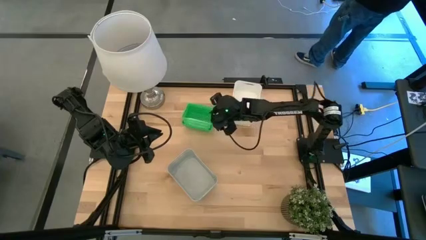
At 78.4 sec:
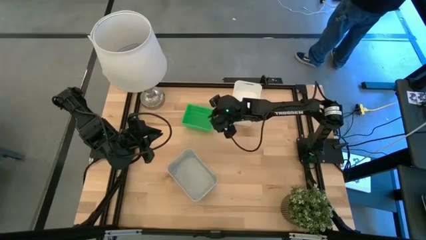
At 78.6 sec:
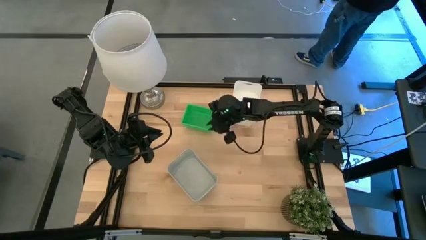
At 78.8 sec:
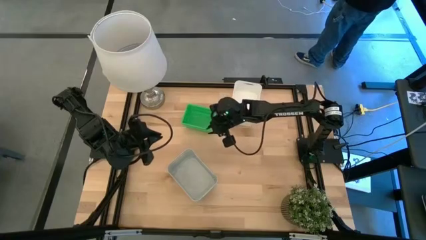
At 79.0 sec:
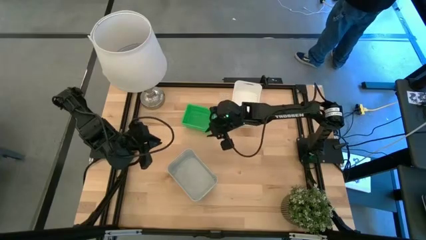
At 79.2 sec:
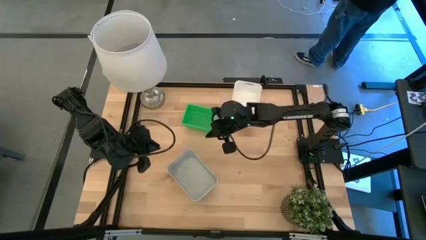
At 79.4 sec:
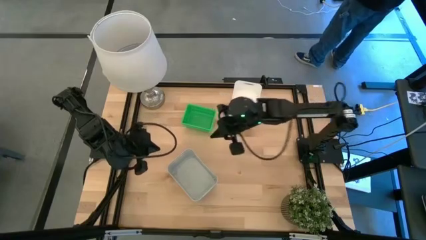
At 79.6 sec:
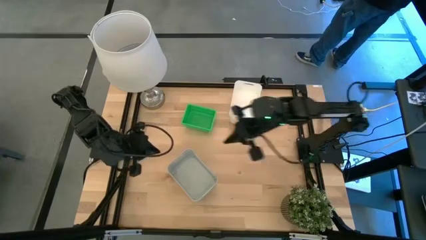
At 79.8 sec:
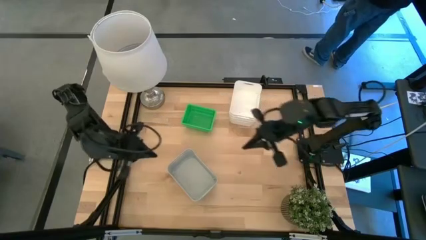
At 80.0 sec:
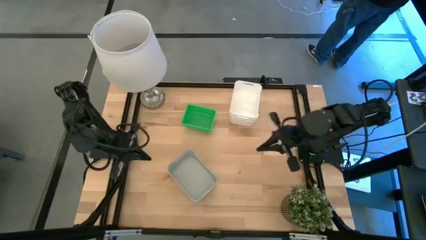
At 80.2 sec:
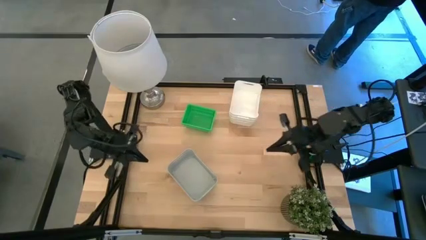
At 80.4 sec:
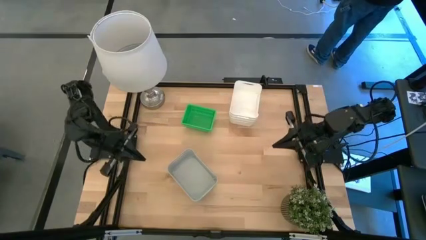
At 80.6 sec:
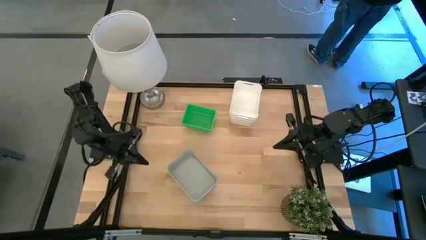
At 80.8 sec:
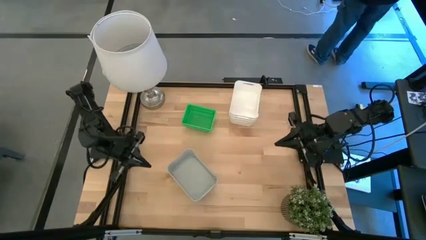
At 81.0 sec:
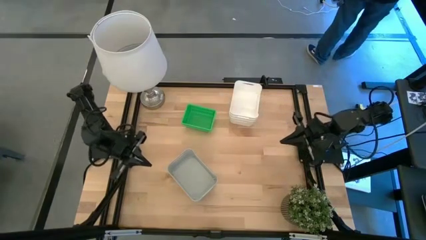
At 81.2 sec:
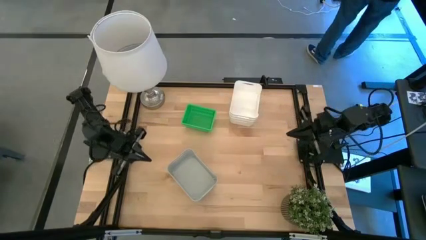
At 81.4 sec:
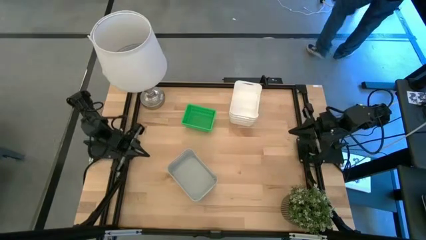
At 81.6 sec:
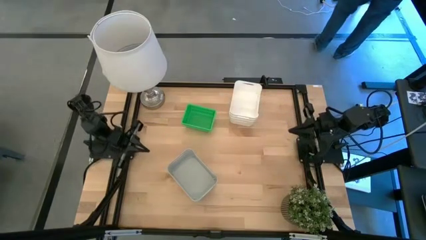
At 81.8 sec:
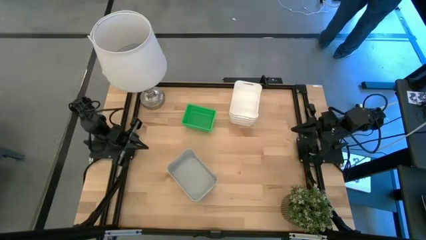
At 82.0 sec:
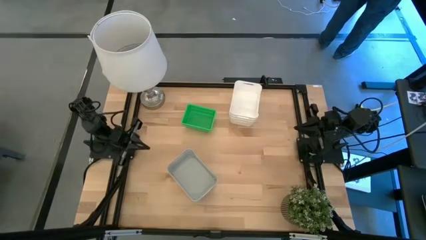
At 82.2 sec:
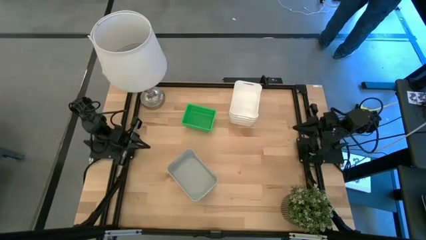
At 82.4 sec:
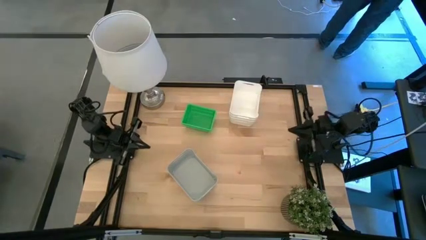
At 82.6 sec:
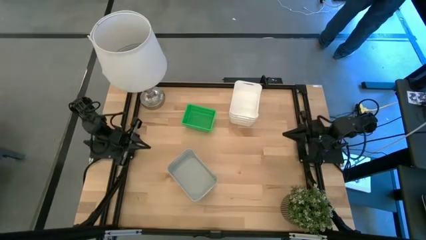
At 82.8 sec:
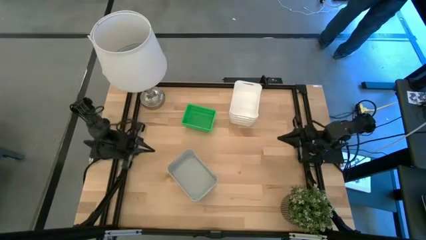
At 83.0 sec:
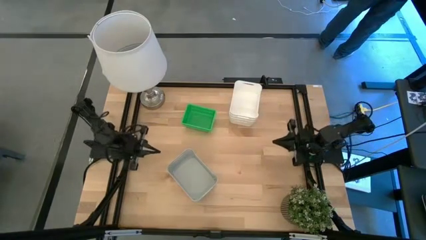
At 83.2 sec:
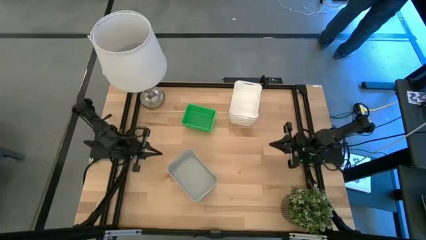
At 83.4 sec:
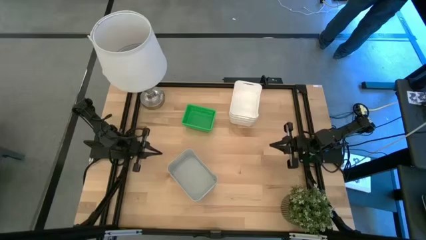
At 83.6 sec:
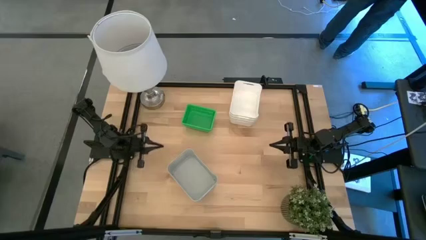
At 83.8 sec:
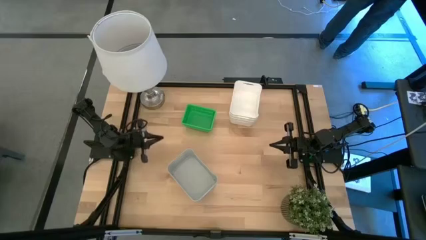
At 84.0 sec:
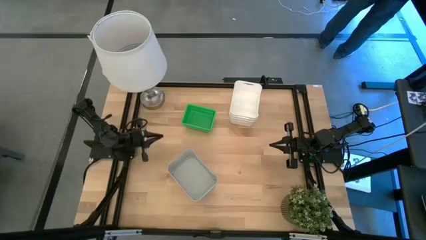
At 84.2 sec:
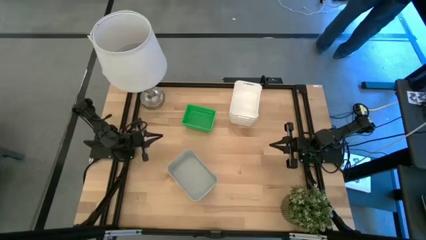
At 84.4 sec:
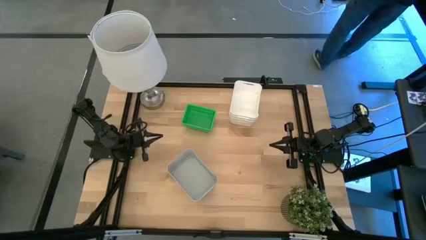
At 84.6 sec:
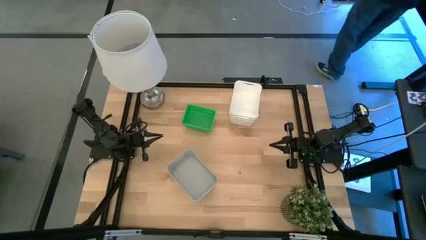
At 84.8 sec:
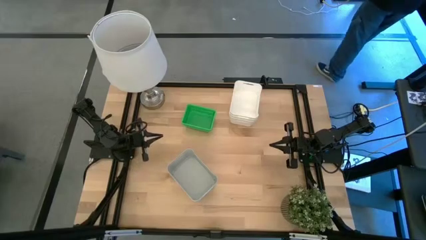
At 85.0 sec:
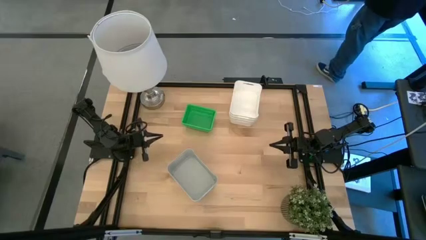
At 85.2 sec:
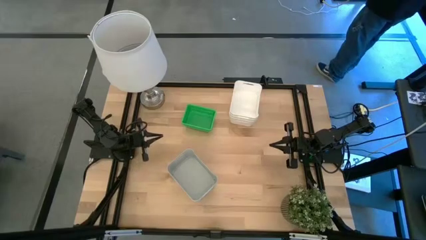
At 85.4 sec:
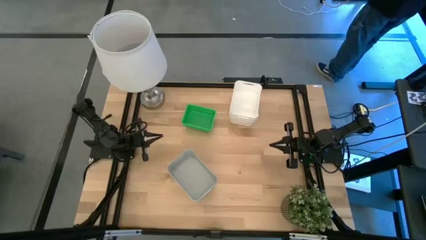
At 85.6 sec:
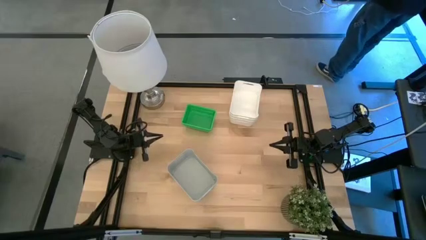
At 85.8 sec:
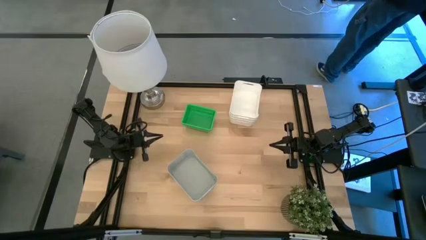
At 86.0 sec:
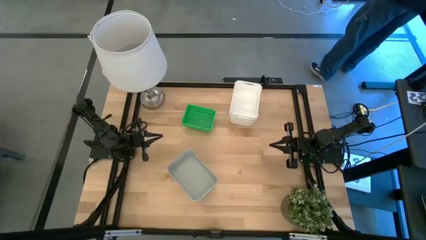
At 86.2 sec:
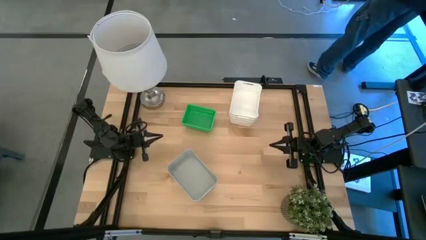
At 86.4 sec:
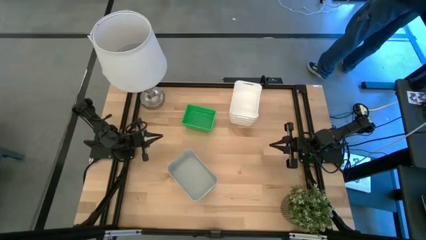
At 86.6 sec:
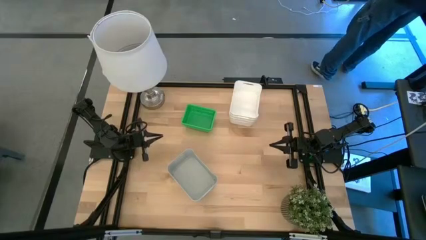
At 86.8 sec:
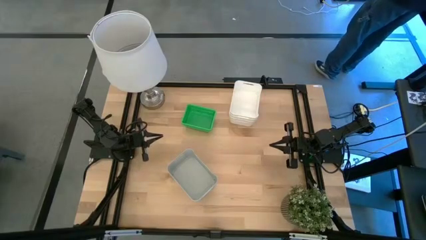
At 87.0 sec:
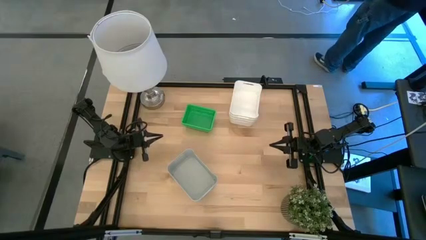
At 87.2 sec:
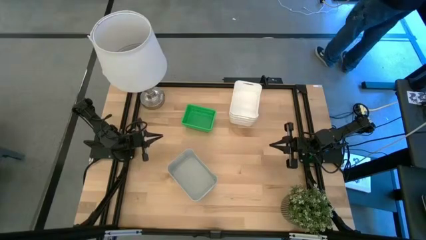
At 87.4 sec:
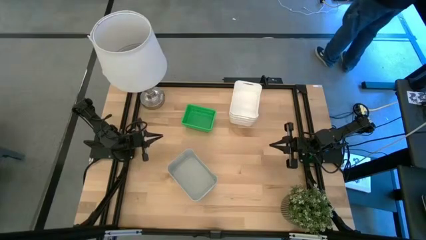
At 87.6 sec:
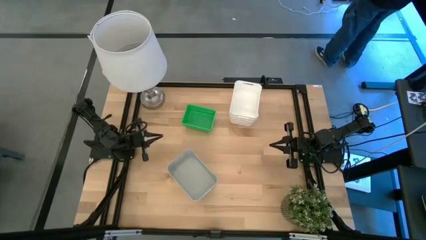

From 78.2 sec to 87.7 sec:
Return to Home Position
